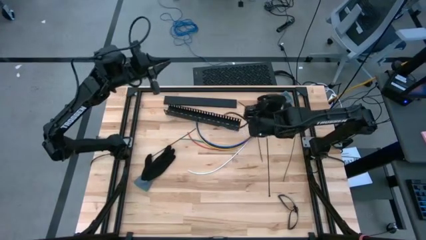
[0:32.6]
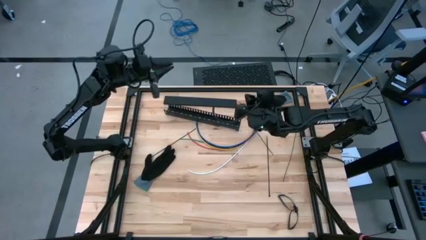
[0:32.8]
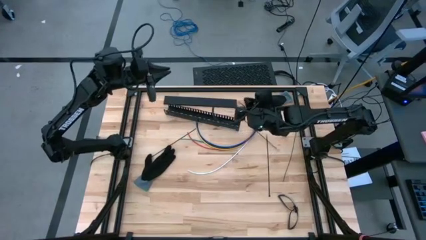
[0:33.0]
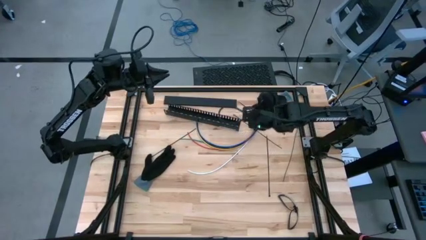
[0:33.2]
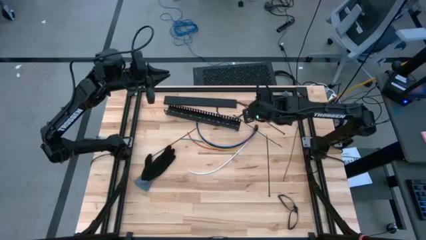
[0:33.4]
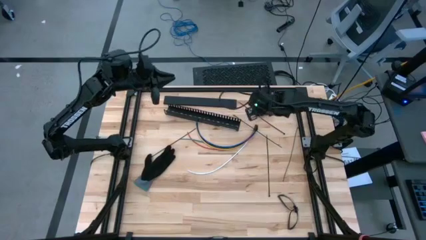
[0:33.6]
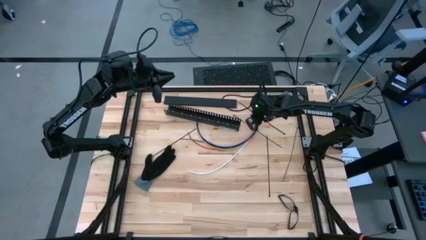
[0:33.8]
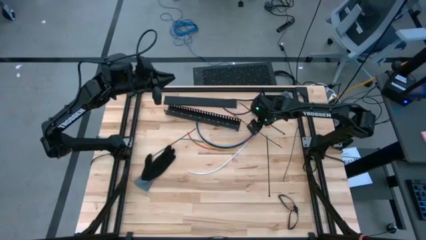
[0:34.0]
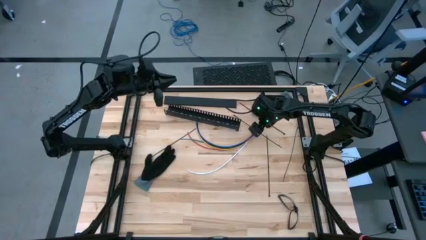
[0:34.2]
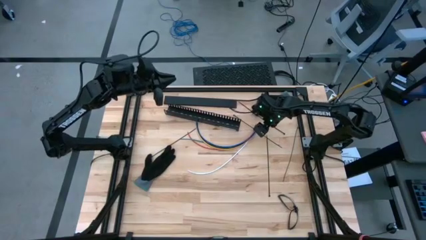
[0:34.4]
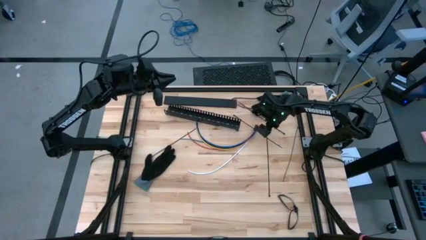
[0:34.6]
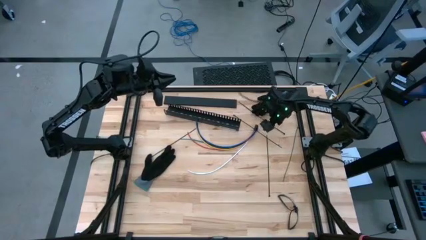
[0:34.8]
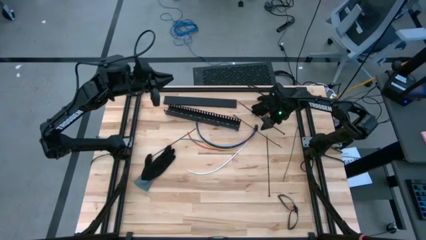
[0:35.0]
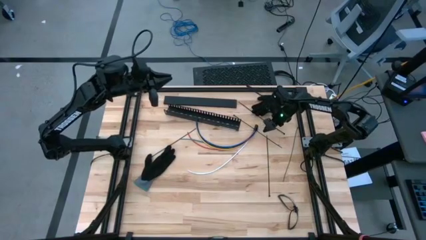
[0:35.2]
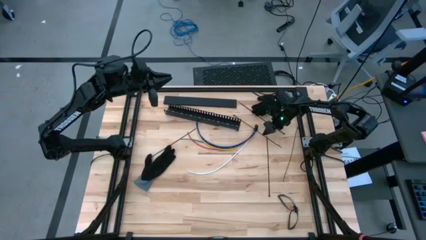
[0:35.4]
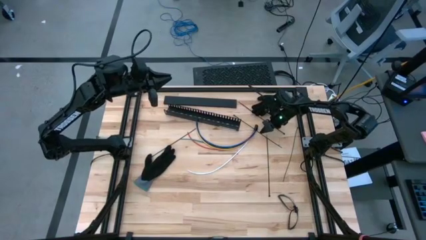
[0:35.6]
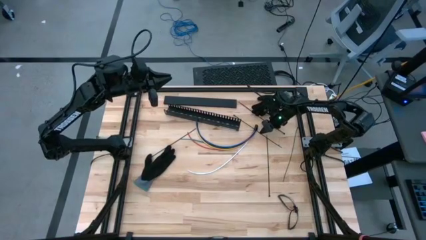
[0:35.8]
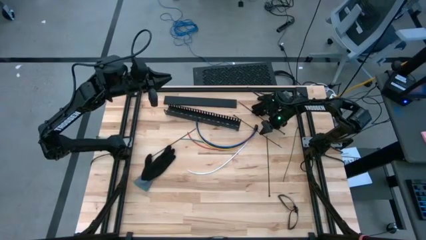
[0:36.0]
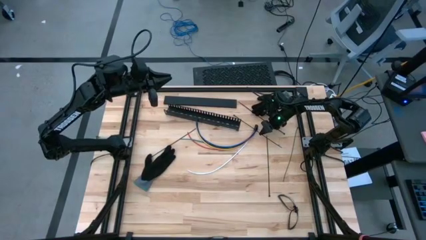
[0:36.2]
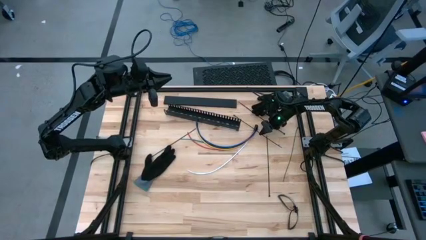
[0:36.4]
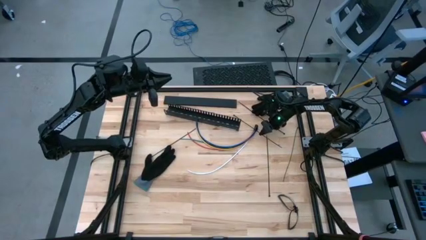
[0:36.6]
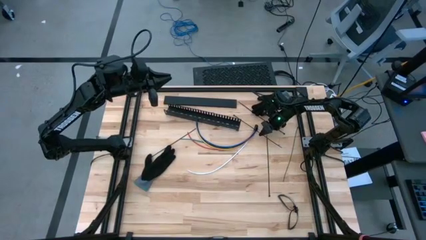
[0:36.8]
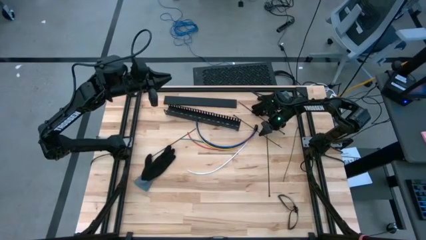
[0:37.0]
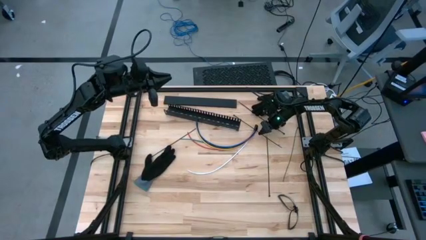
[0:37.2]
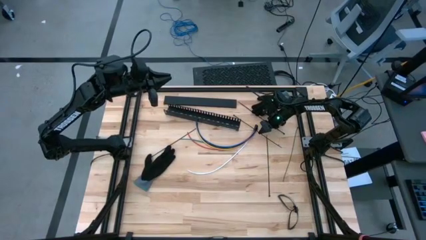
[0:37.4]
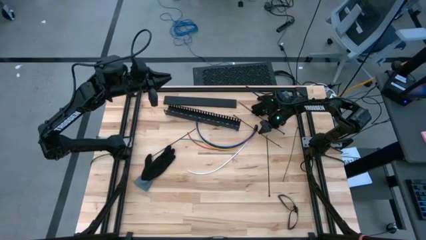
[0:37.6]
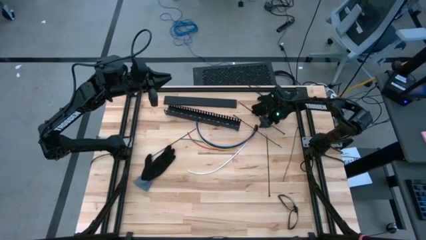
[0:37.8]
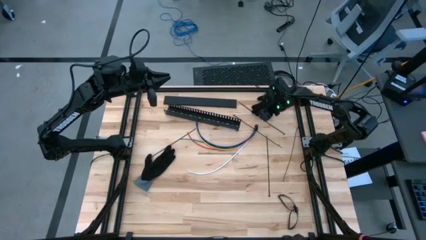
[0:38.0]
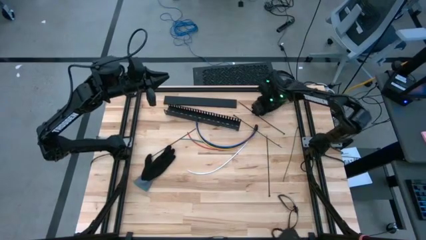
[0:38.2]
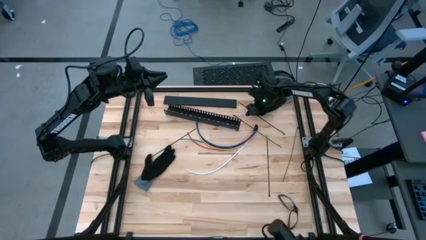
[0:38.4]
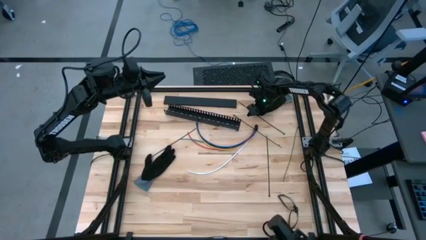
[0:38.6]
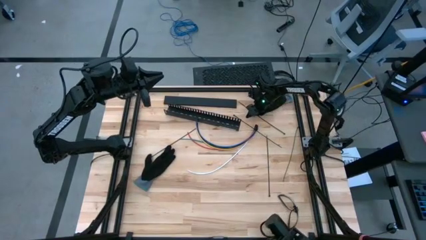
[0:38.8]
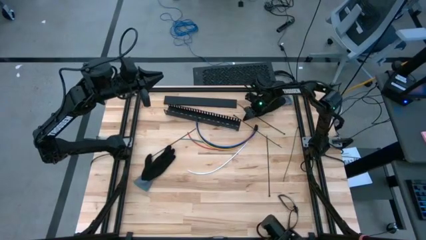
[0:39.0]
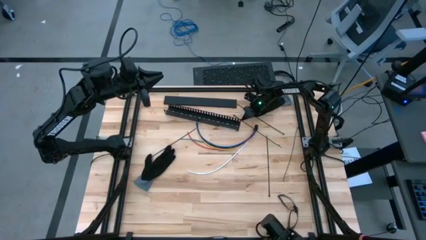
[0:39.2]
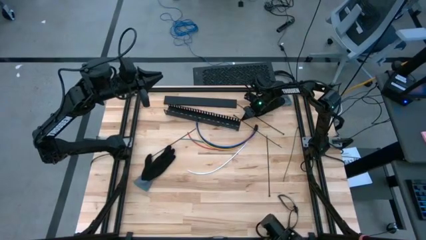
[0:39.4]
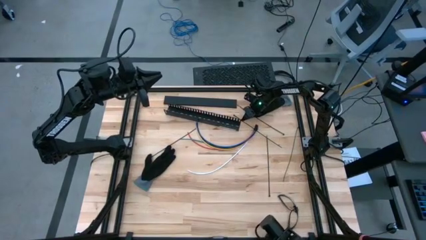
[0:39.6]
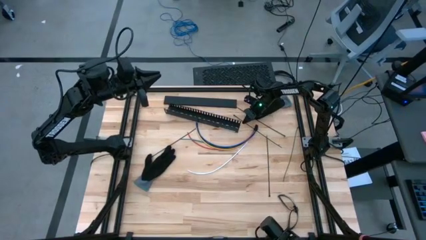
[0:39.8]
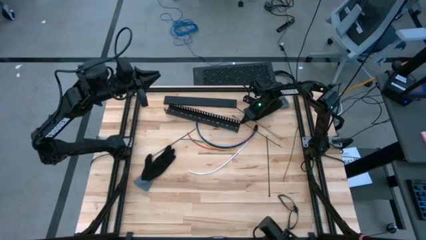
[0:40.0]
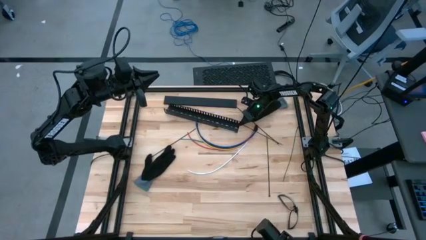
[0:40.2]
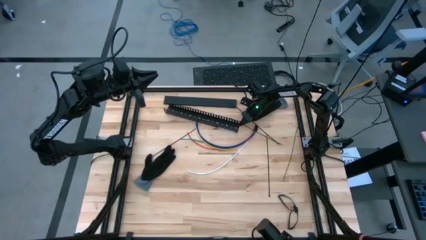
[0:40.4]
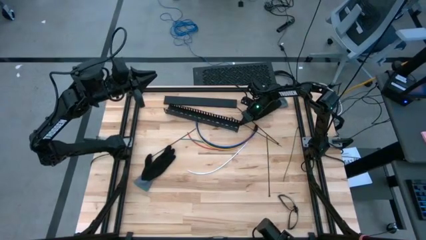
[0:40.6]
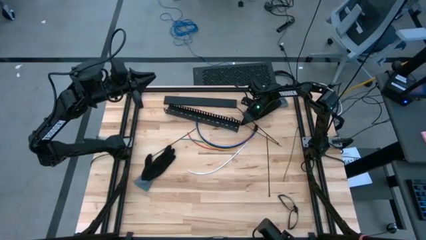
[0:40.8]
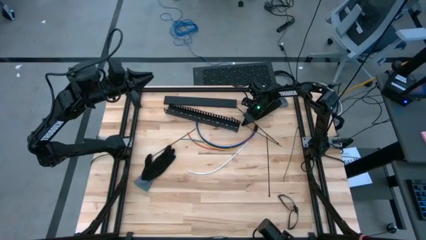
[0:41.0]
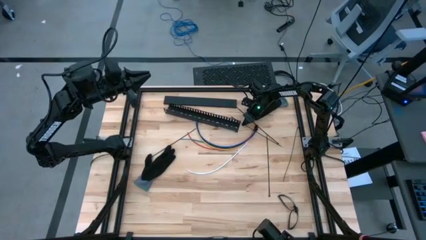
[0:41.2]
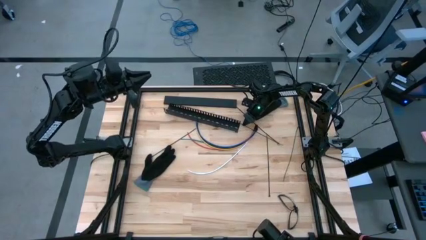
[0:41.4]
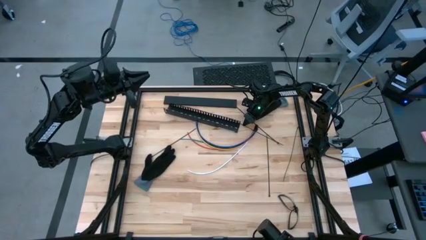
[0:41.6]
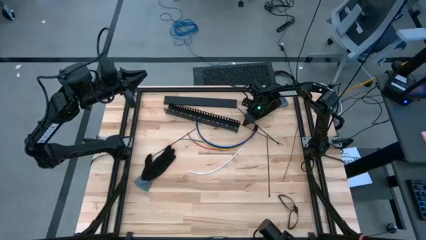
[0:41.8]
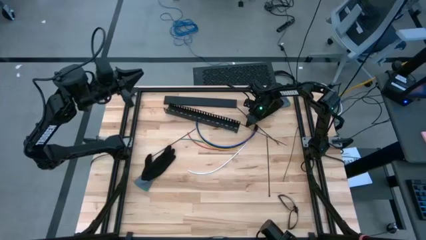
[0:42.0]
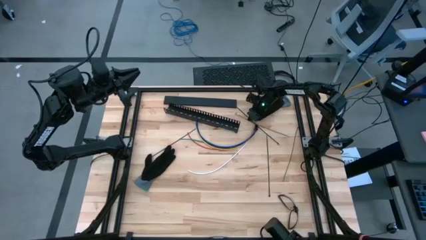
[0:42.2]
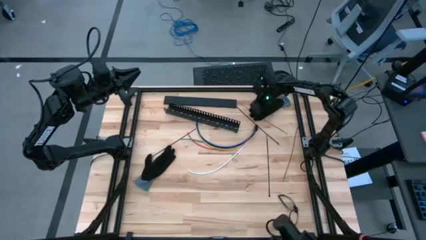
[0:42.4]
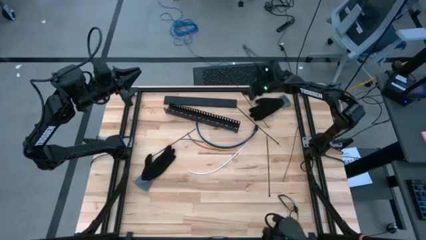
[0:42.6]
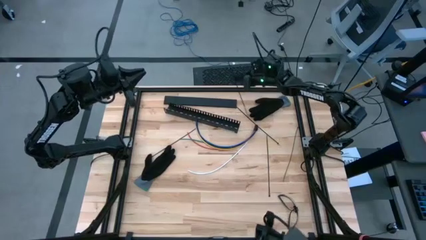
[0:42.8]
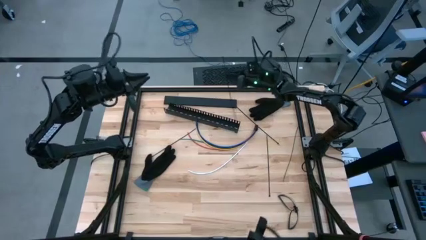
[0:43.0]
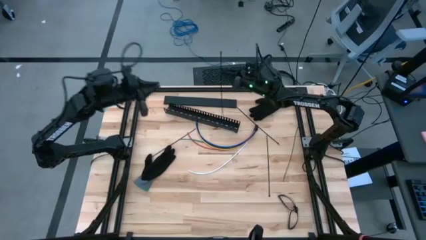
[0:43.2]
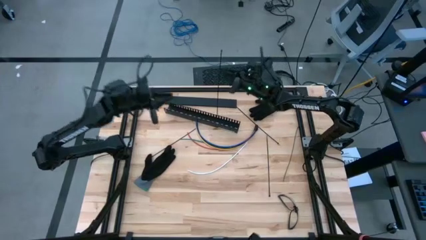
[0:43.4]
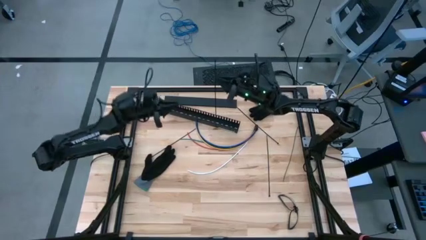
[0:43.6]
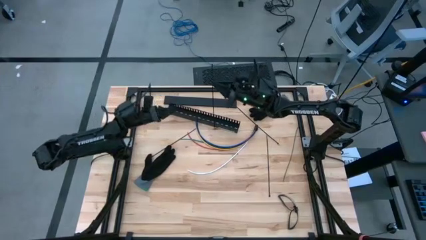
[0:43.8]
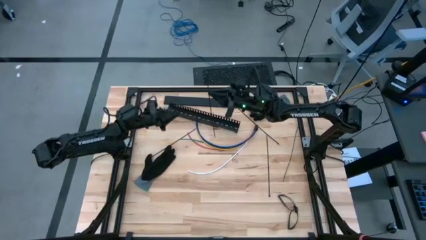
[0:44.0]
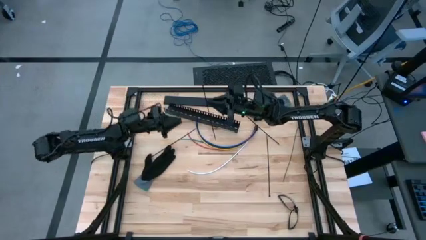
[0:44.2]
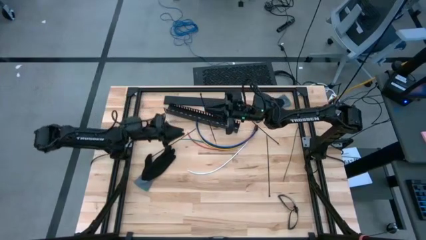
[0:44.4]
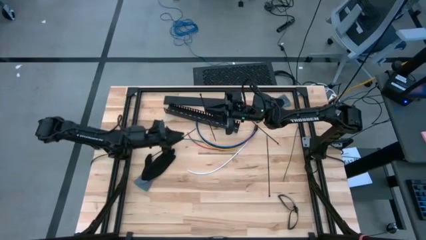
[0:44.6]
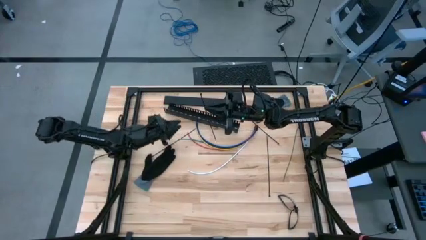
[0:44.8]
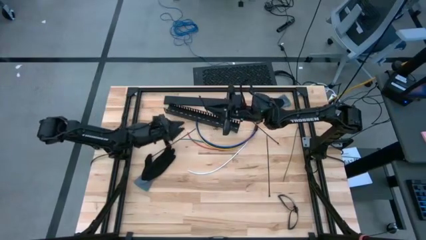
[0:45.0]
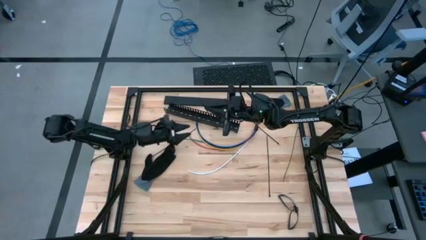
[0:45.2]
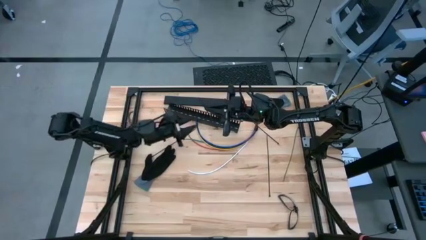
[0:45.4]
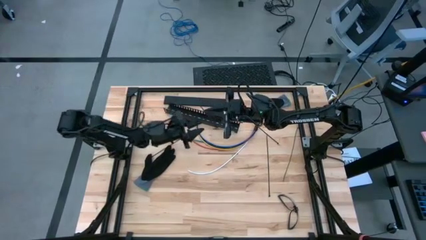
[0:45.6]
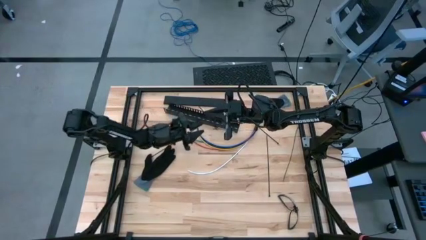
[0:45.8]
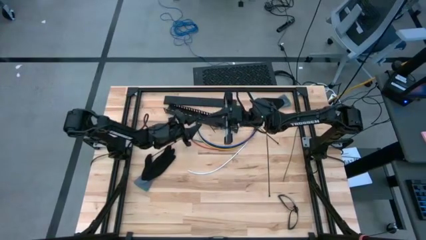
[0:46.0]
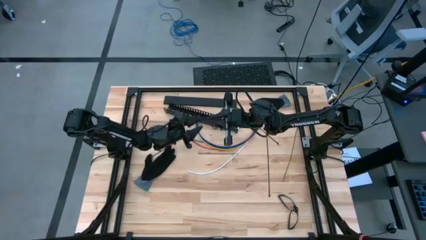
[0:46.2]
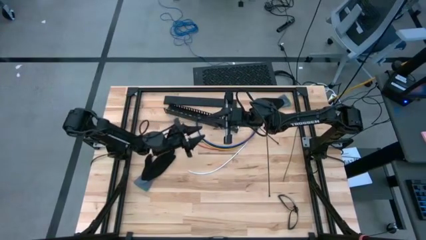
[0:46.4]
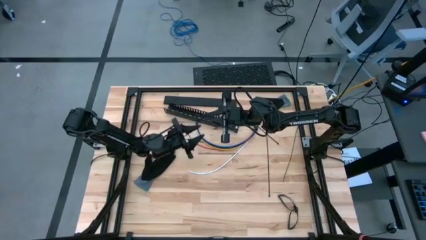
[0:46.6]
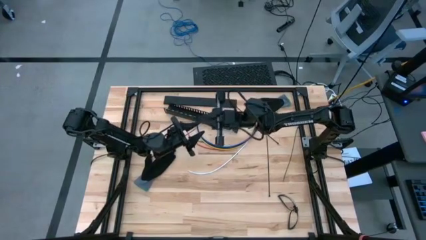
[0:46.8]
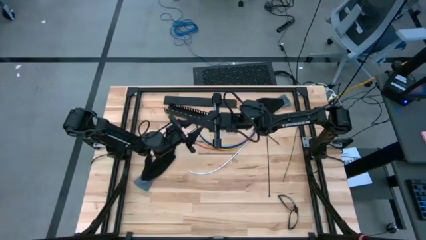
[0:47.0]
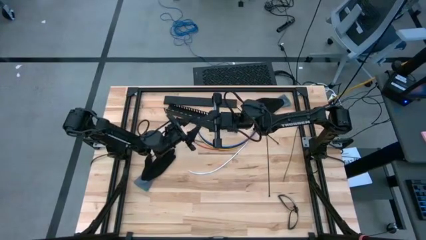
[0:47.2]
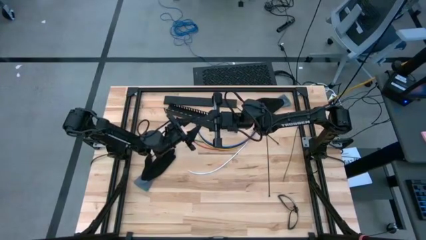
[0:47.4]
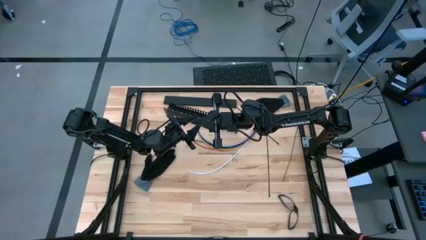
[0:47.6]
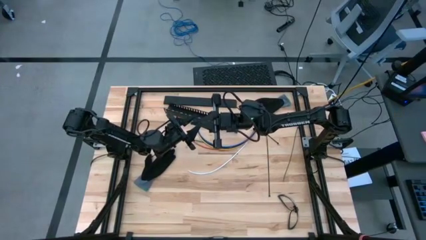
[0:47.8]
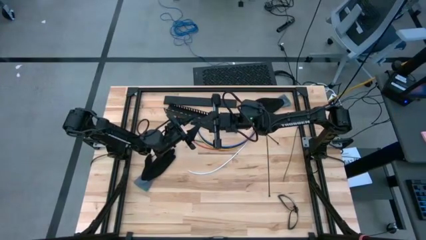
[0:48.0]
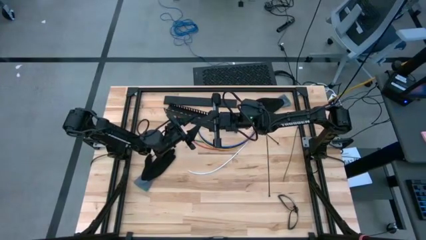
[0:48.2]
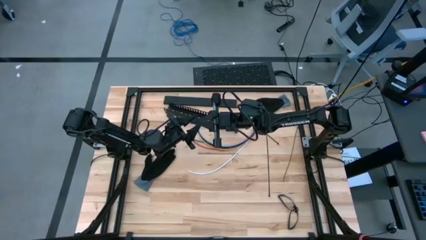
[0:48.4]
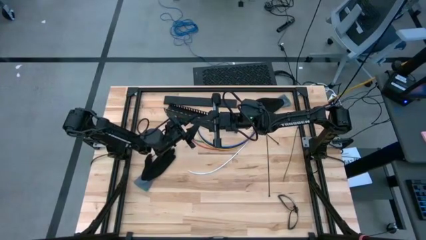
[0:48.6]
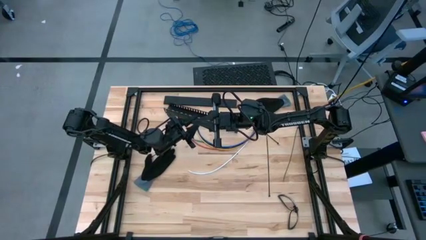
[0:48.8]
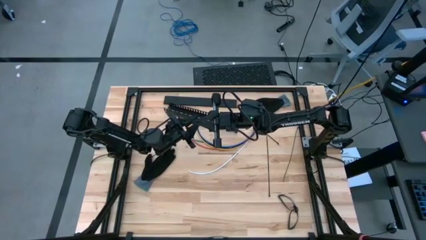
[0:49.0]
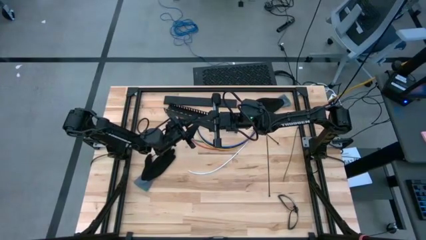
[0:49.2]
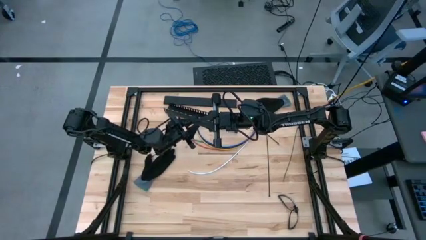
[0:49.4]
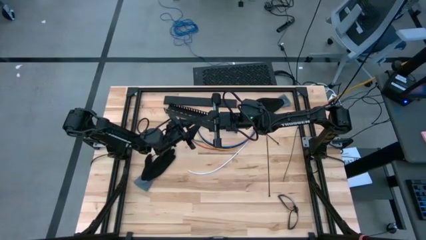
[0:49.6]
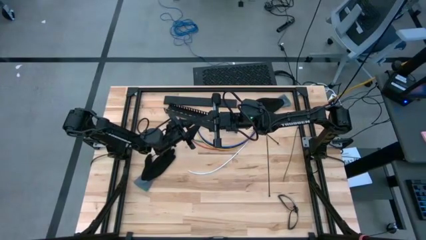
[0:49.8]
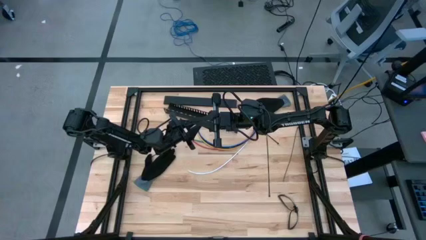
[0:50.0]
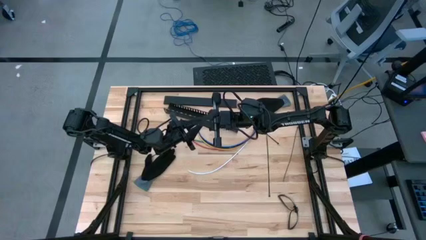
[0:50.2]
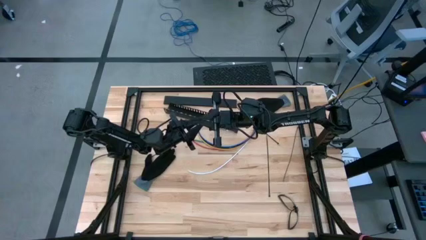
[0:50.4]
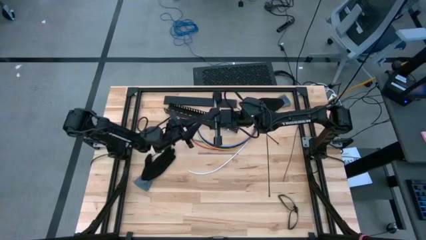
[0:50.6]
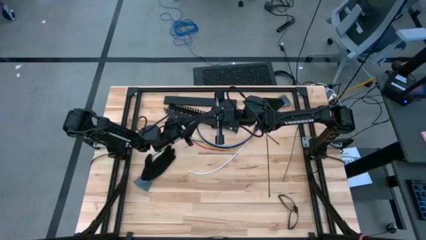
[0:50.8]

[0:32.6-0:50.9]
Task: Ziptie cables
Prepare the zip tie
